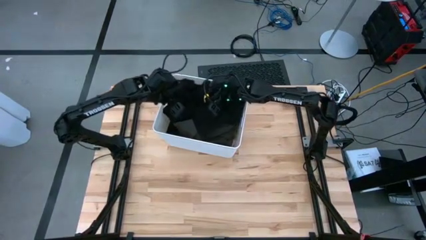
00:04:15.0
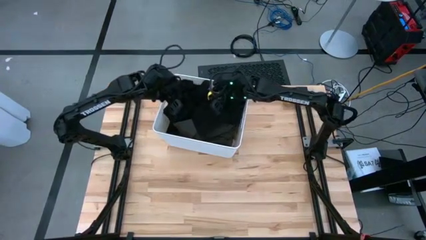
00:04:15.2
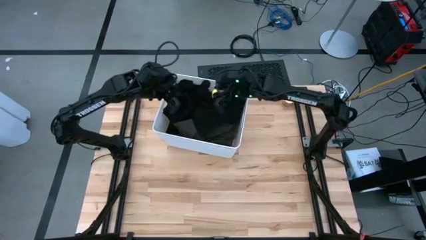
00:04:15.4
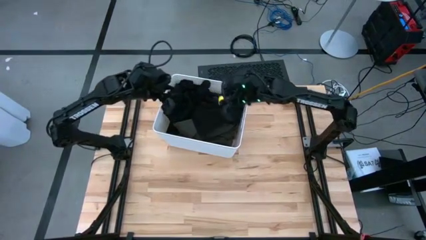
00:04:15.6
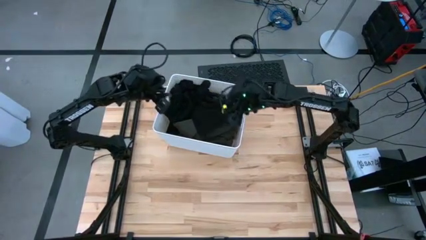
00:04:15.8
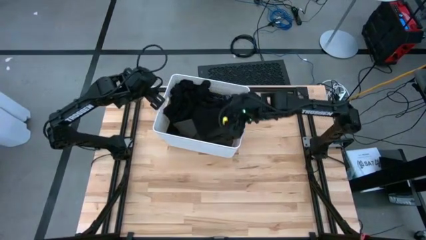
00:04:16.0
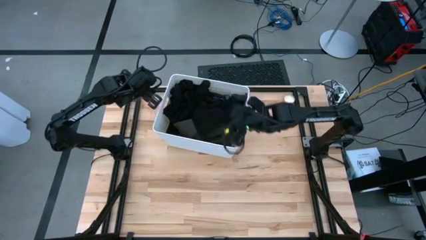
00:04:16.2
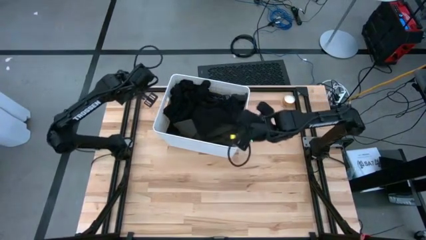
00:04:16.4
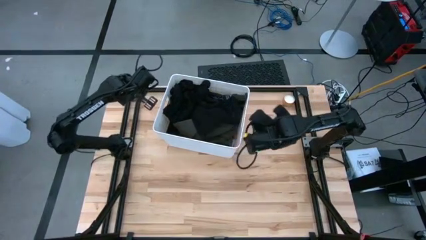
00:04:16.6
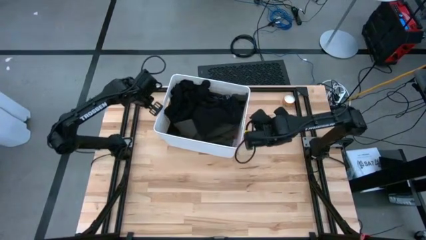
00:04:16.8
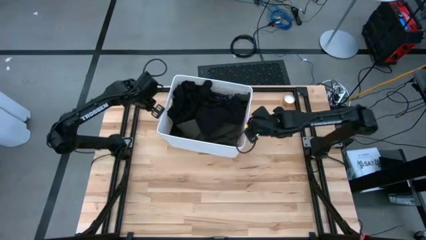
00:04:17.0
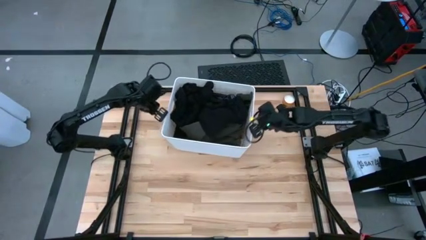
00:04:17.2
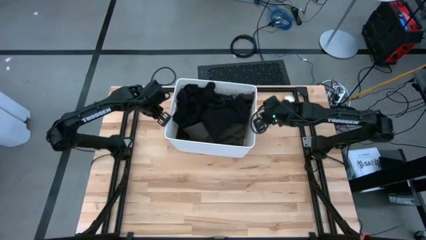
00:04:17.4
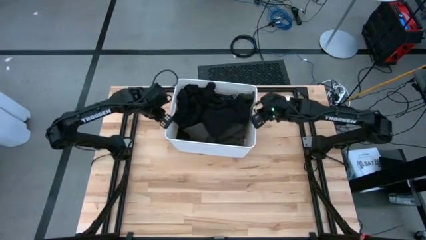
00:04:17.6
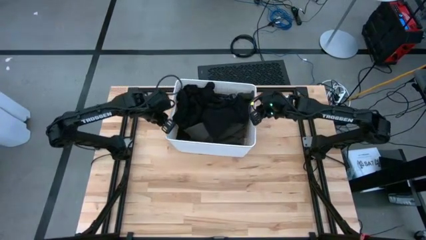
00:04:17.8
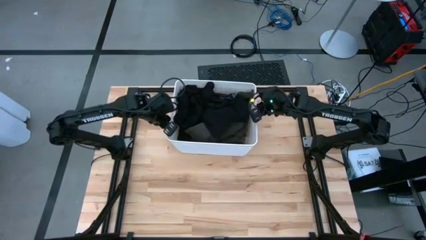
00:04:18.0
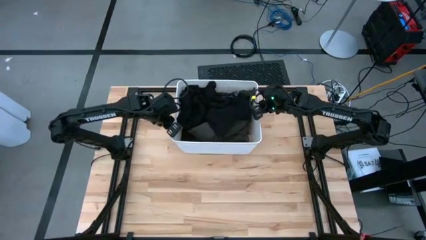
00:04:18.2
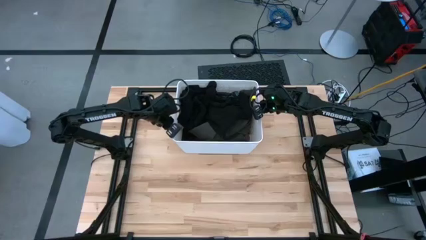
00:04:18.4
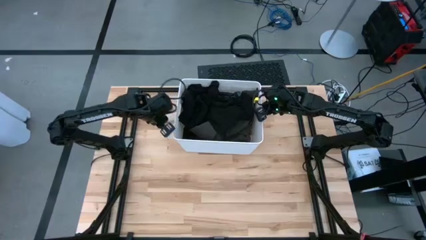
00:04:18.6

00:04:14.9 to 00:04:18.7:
Task: Sort clothes
Adjust the white laundry bin on the table

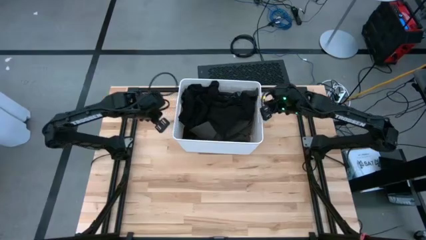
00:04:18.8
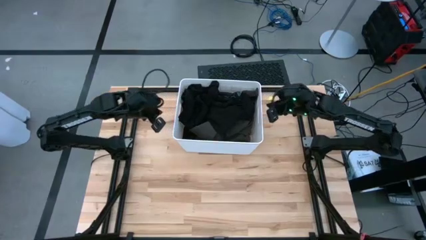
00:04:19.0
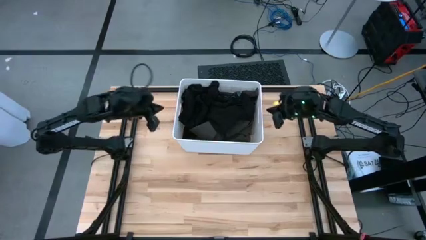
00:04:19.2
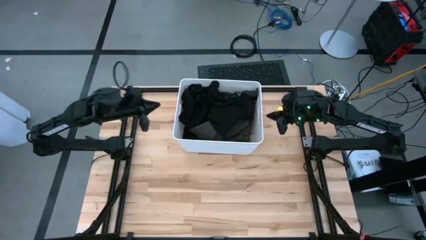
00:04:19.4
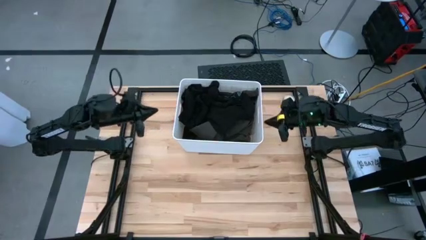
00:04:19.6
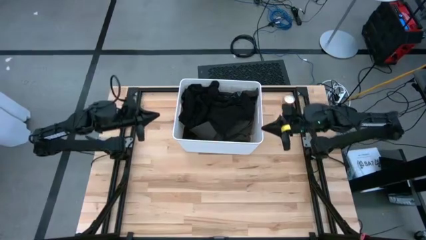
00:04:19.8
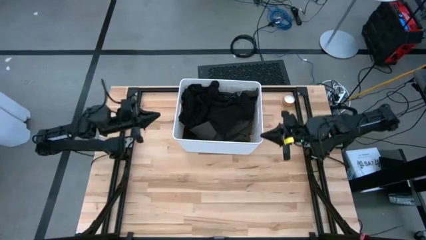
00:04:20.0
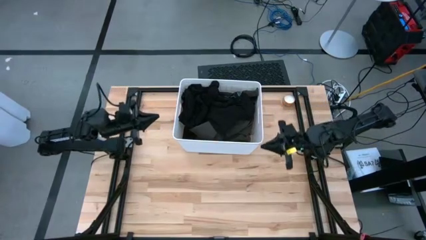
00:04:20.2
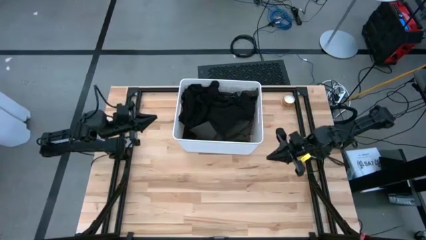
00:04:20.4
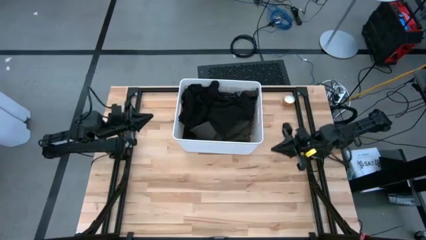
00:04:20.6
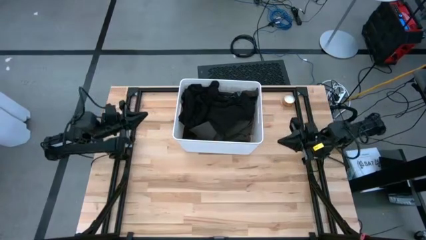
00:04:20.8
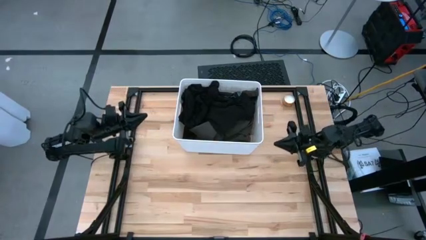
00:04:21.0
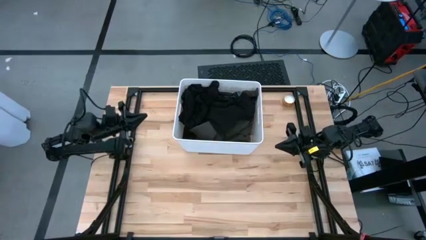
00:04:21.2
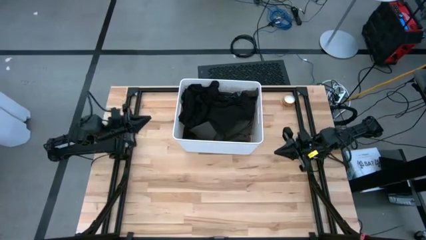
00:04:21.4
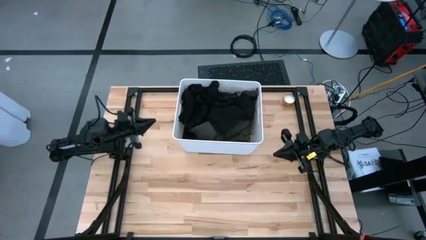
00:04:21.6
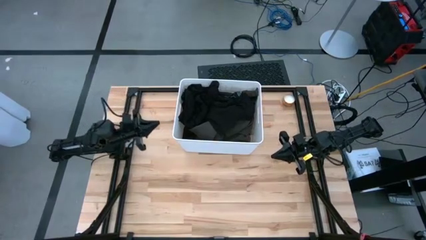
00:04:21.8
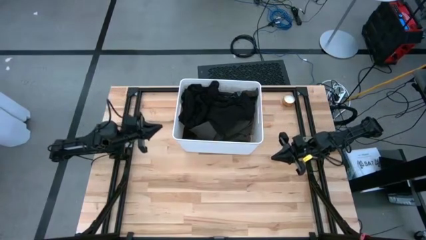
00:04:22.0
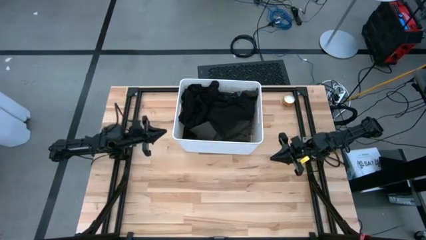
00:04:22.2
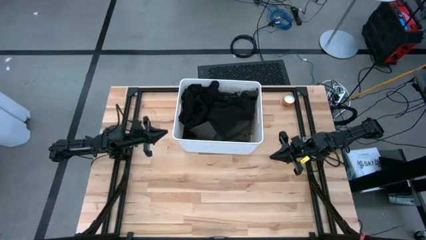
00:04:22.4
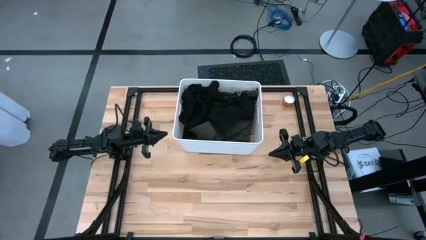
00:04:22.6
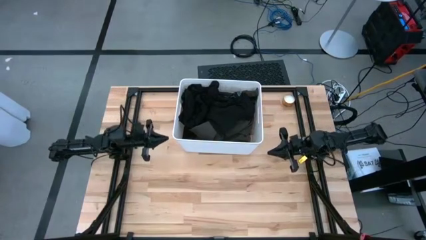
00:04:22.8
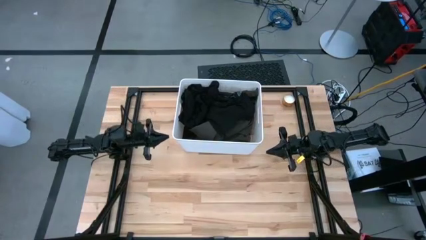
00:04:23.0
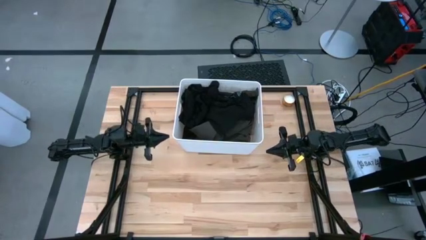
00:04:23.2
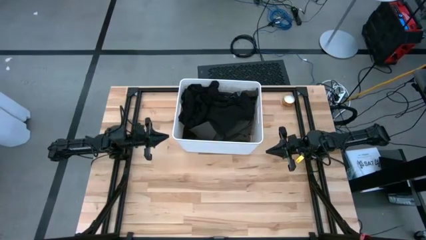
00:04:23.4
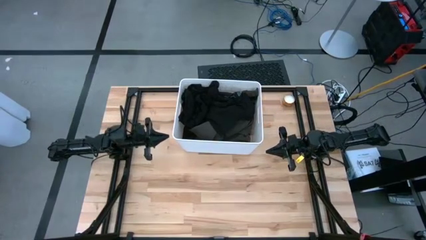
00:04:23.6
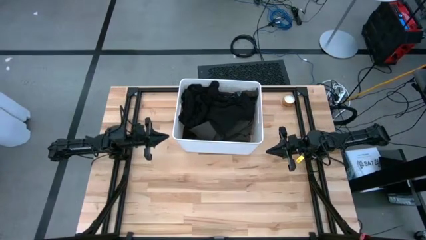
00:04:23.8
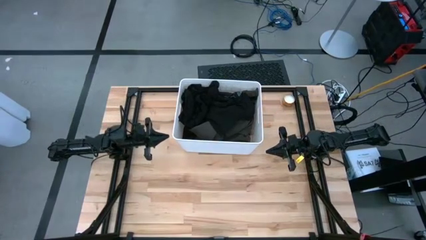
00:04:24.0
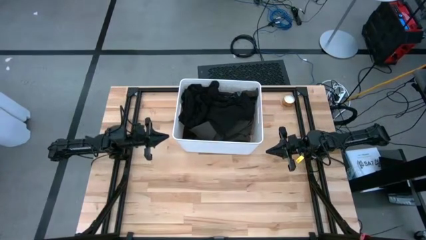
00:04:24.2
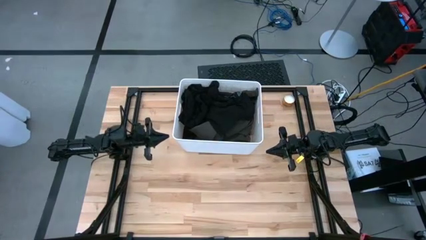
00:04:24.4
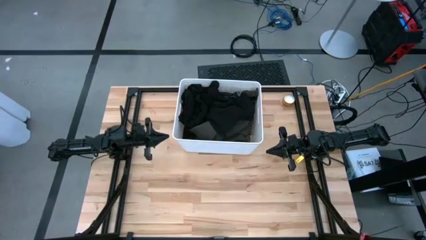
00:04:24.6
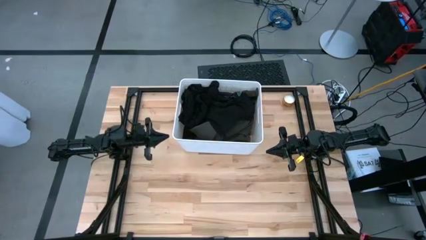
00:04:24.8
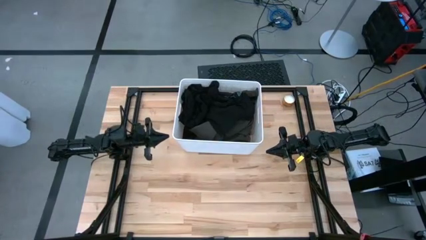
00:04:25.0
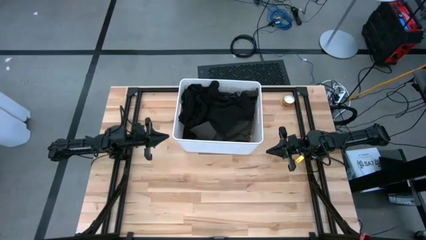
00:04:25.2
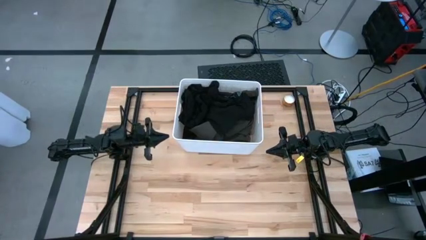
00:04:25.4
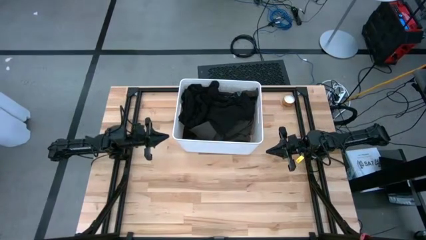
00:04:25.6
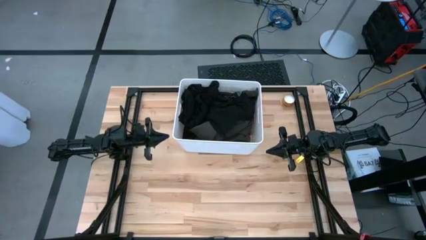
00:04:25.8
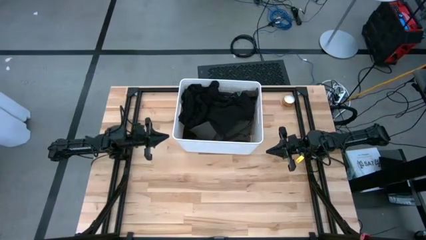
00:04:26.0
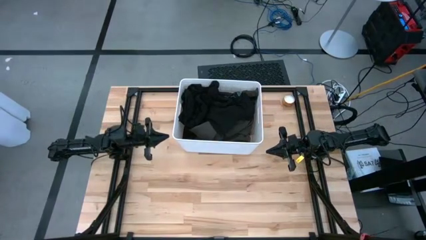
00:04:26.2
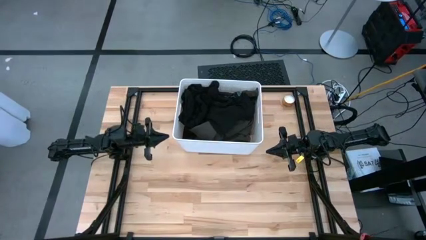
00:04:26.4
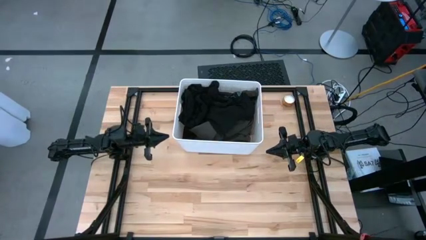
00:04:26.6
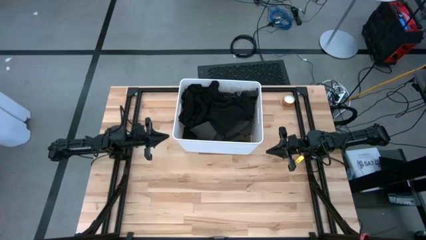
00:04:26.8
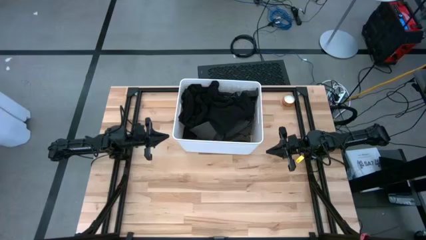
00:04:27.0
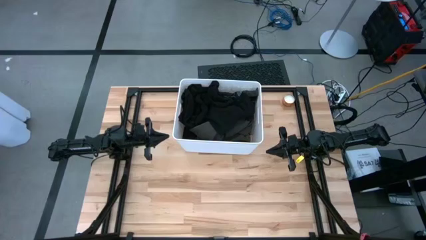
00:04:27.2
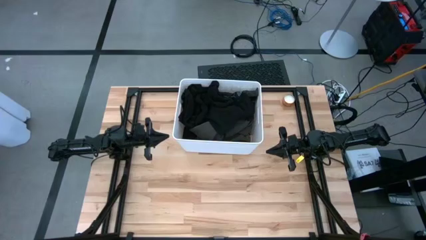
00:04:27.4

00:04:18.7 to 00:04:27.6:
Return to Home Position

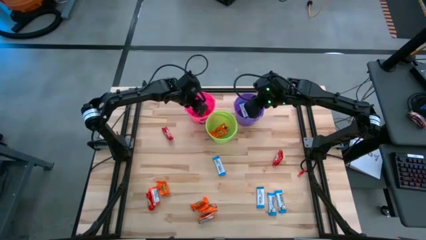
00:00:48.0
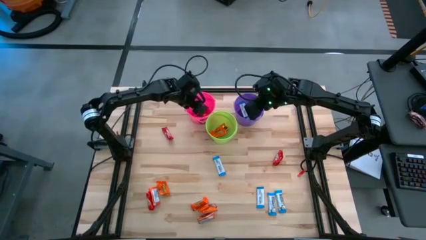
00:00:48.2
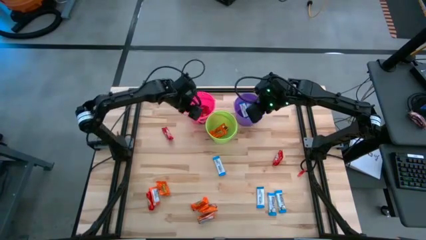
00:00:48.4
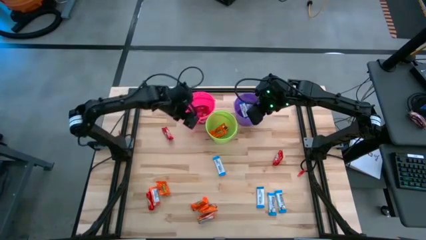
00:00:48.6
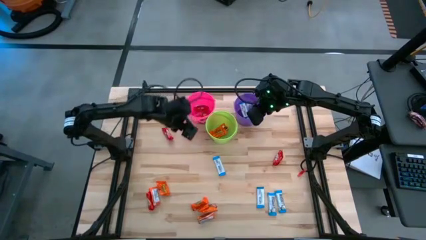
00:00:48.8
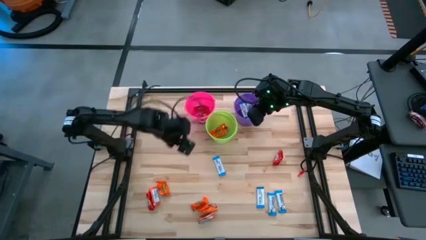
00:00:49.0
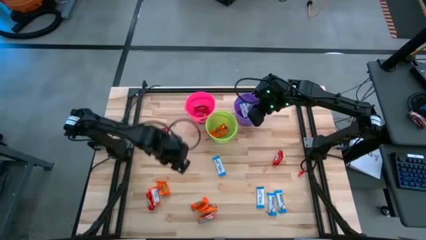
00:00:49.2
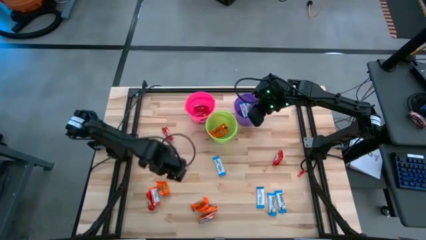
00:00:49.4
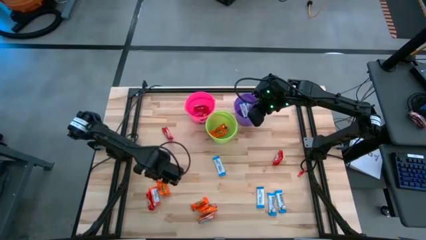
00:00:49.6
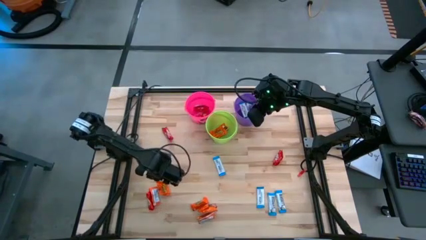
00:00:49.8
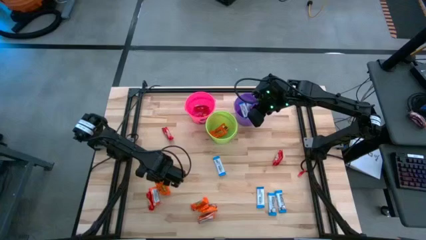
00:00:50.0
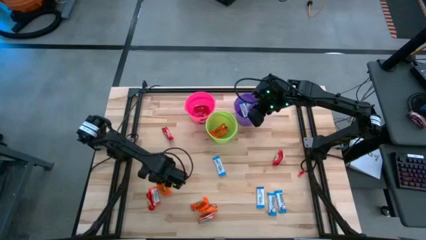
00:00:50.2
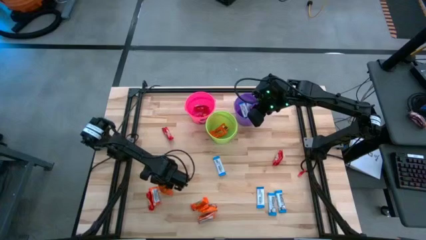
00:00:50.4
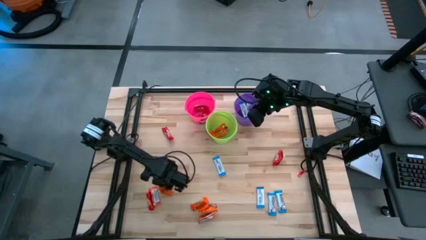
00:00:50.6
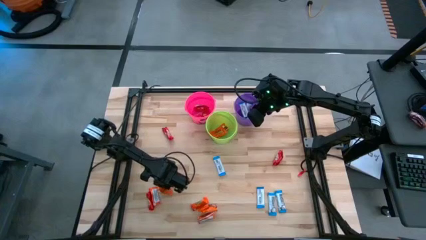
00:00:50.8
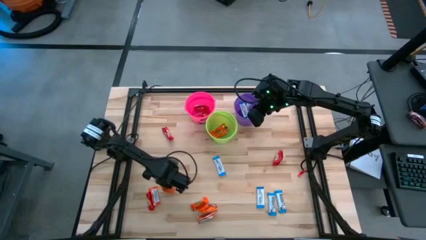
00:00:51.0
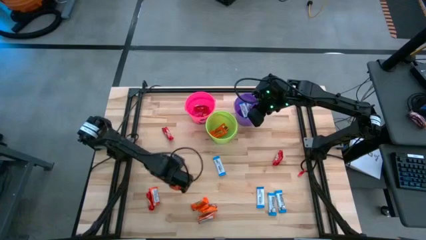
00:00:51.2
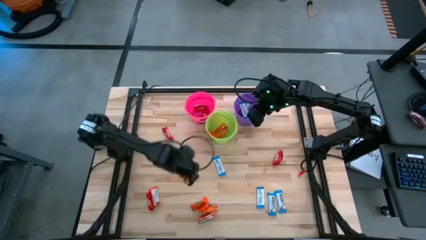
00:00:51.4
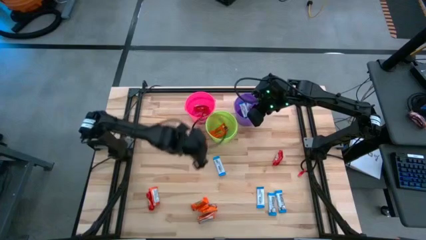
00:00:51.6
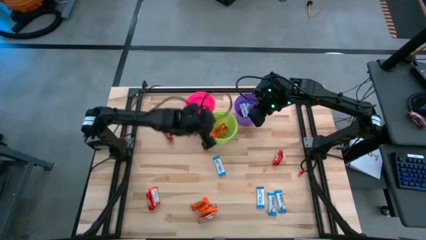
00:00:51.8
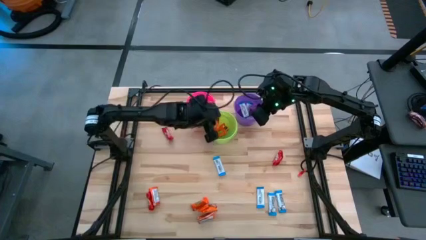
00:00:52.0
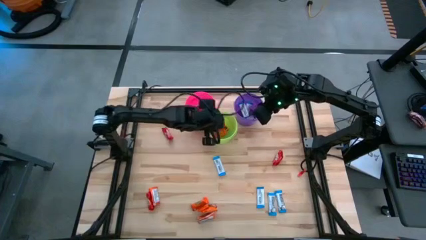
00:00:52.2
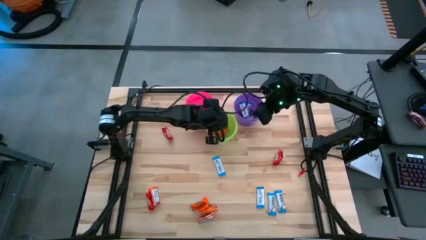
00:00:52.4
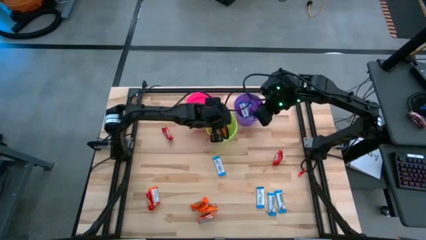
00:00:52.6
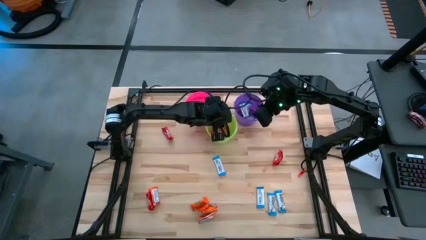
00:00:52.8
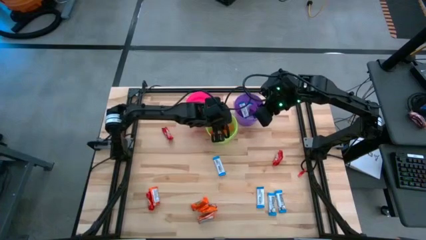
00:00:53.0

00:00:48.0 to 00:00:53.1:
Task: Sort candy
Put the orange candy into the green bin
